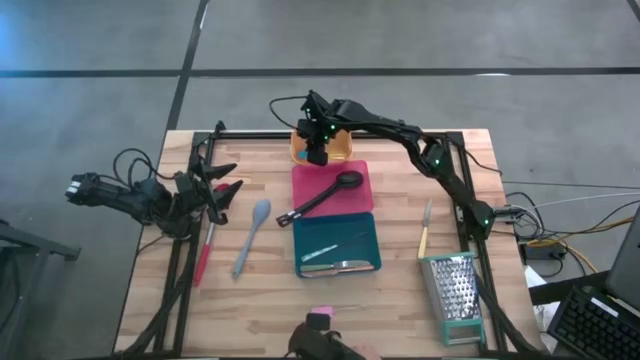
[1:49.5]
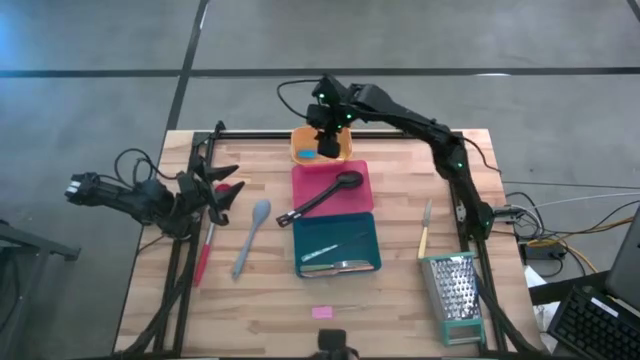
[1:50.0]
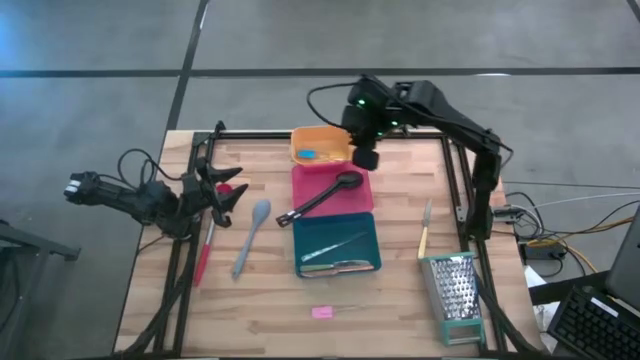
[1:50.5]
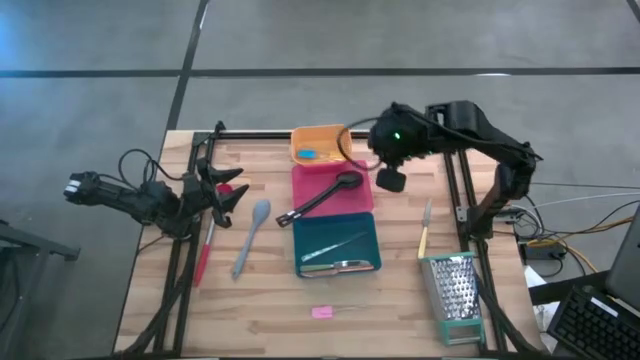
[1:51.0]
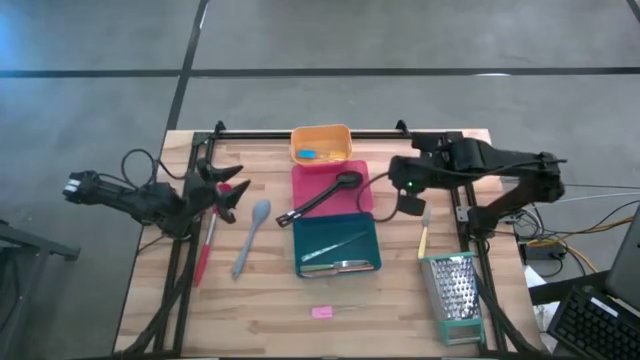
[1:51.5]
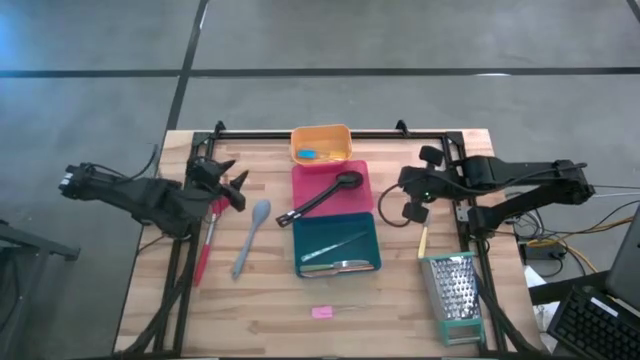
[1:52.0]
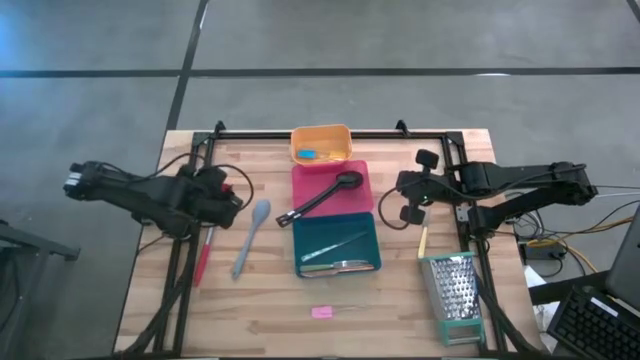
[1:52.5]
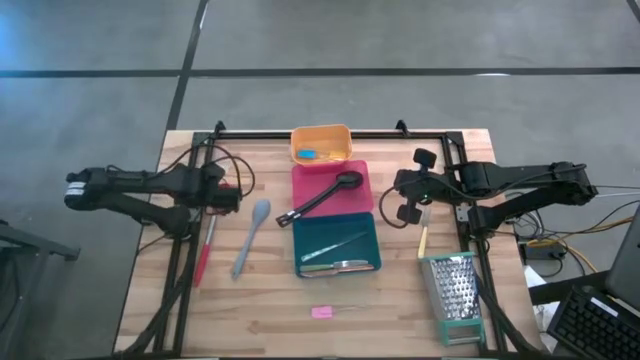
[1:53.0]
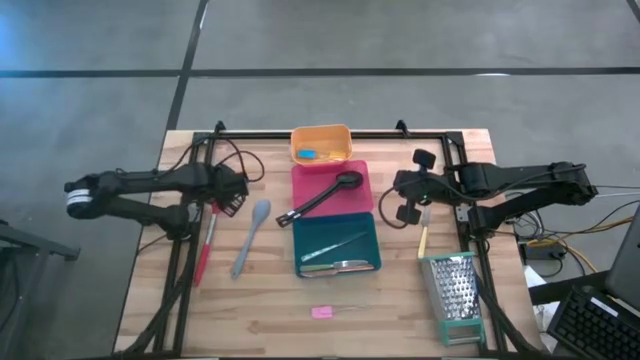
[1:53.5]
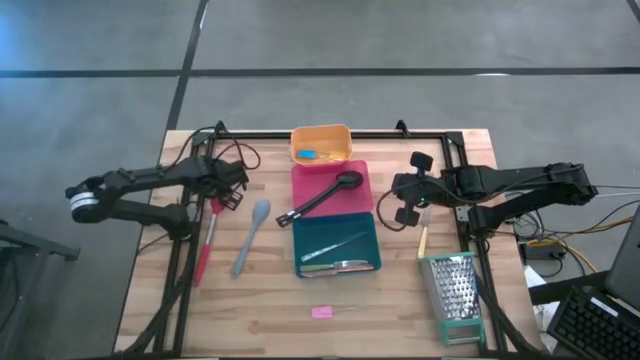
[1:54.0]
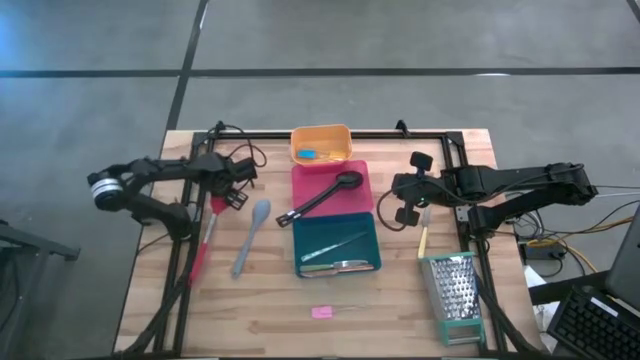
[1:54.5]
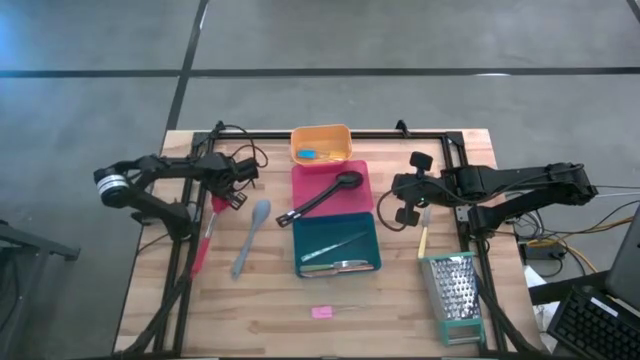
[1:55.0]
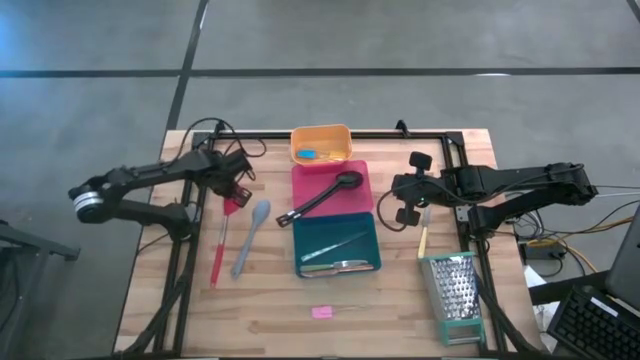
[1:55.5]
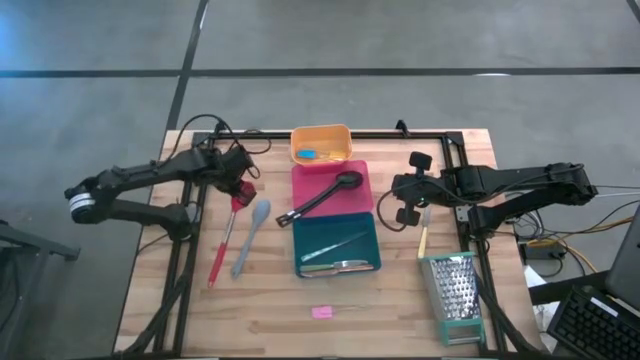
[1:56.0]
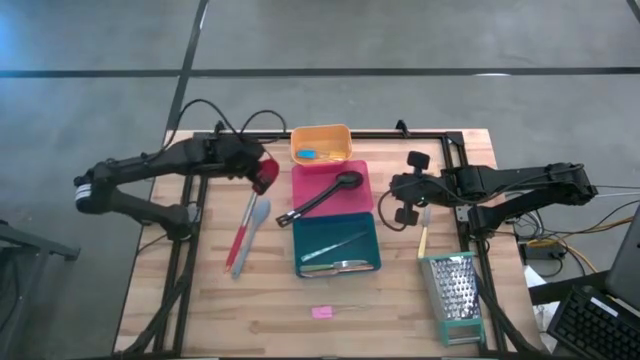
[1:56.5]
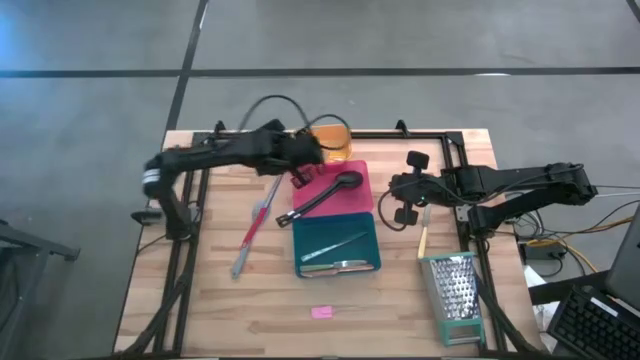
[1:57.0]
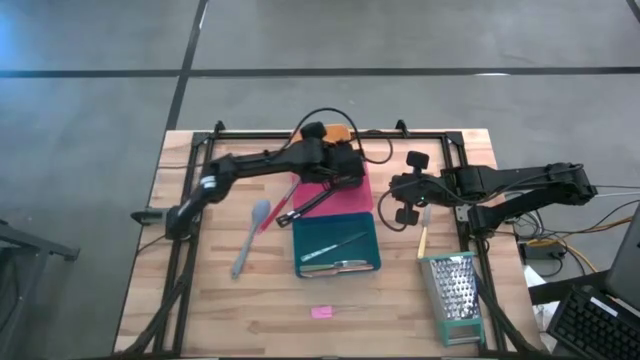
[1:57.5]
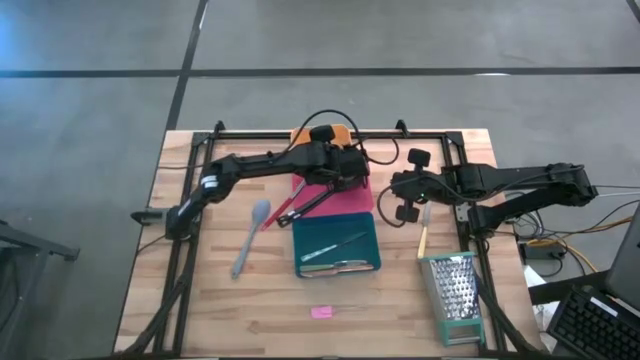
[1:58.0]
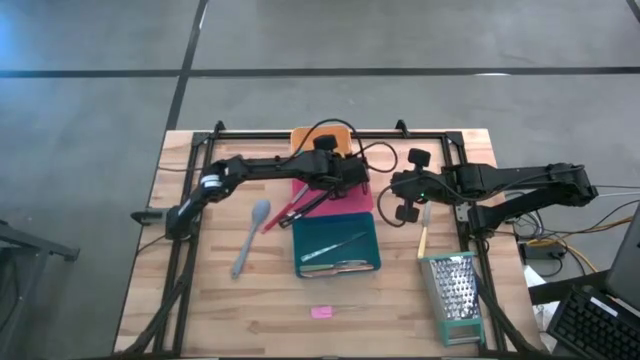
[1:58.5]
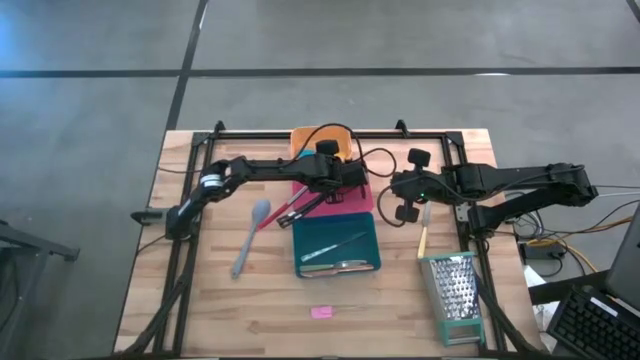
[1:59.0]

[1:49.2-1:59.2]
Task: Pick & Place Kitchen Items
Put the red serving spoon into the pink bin

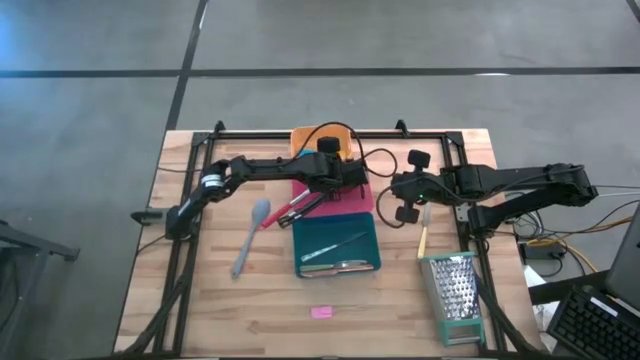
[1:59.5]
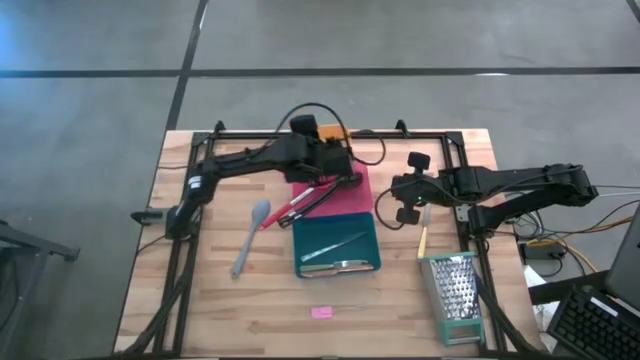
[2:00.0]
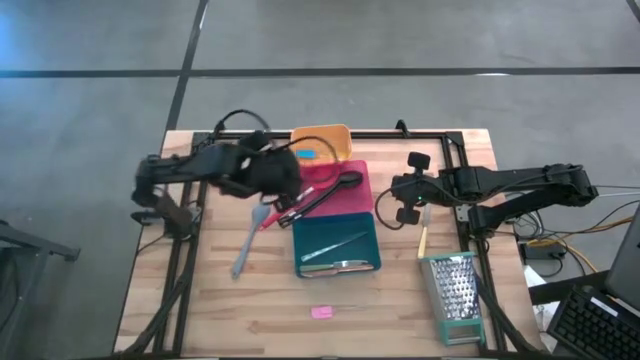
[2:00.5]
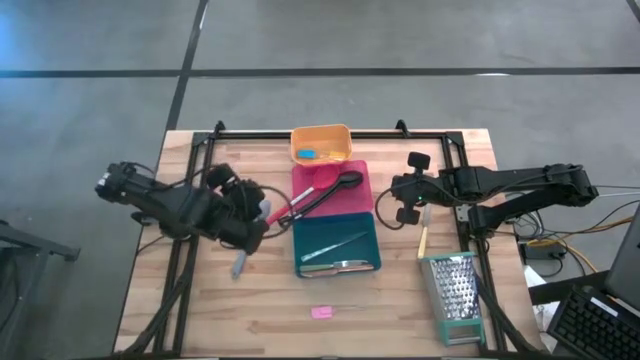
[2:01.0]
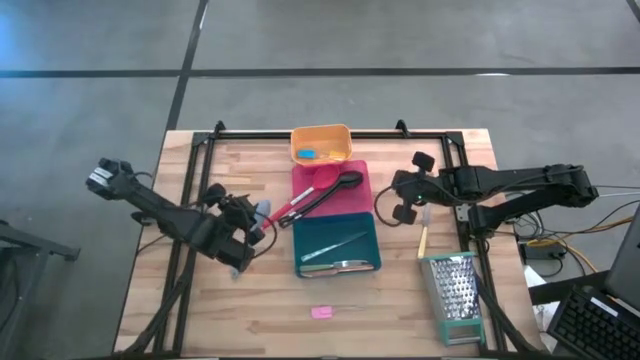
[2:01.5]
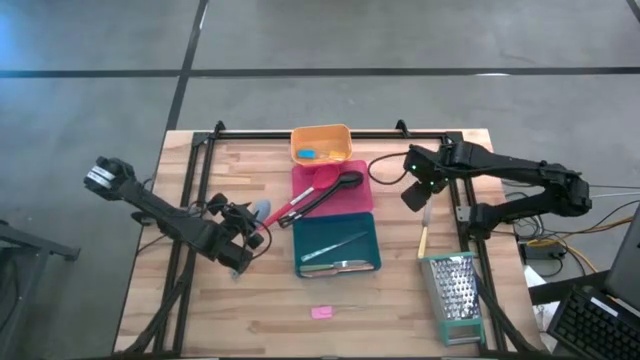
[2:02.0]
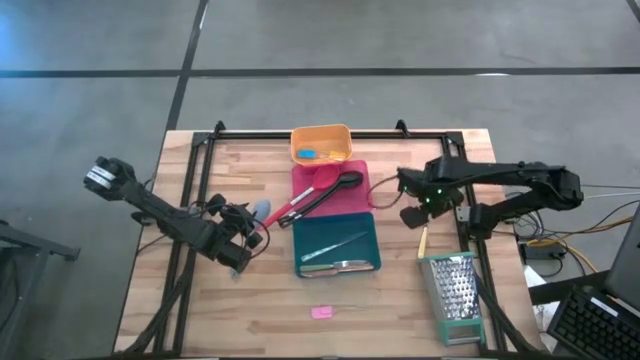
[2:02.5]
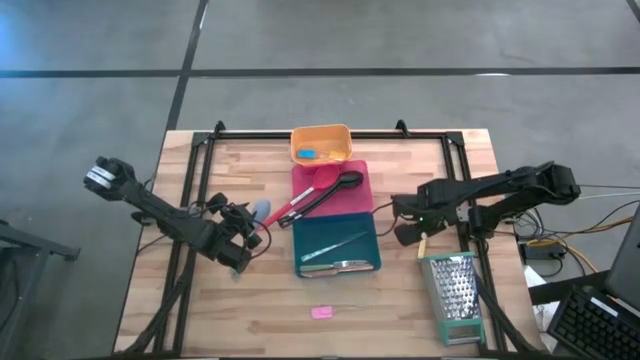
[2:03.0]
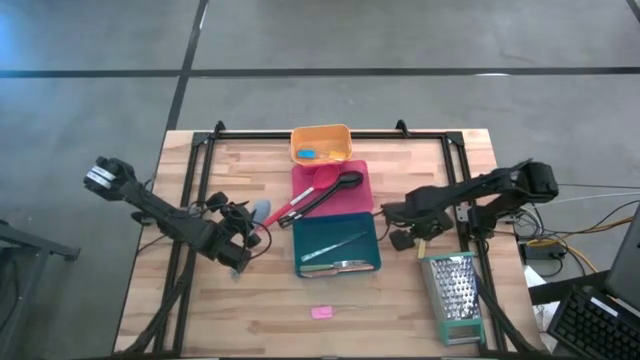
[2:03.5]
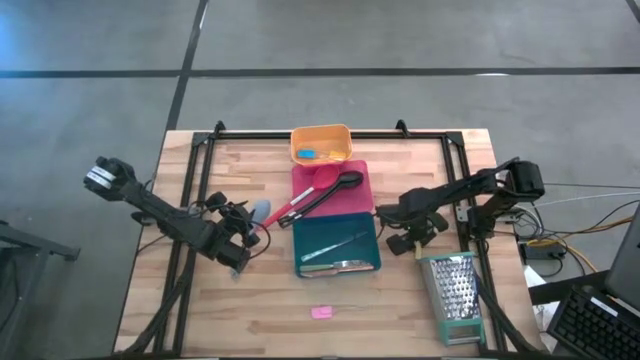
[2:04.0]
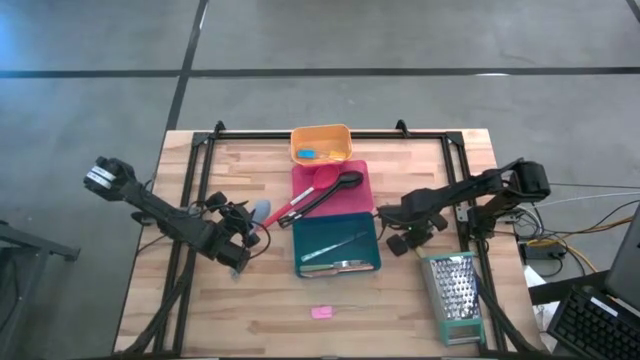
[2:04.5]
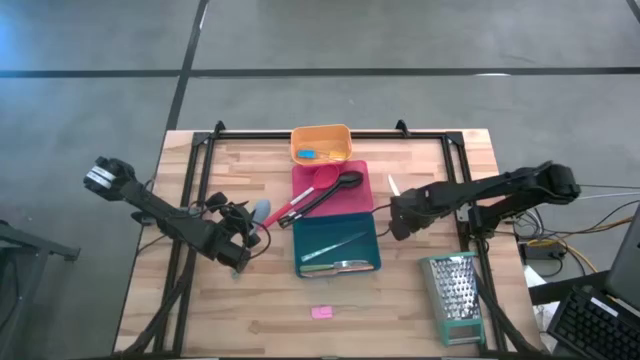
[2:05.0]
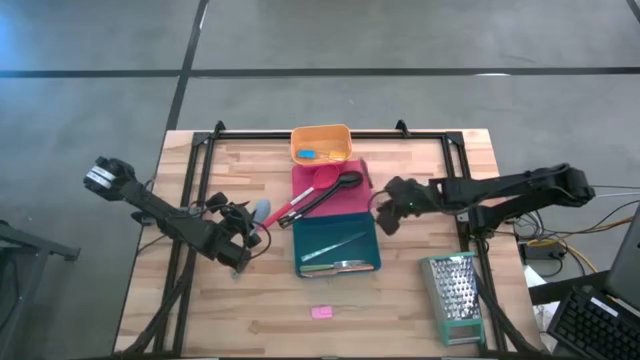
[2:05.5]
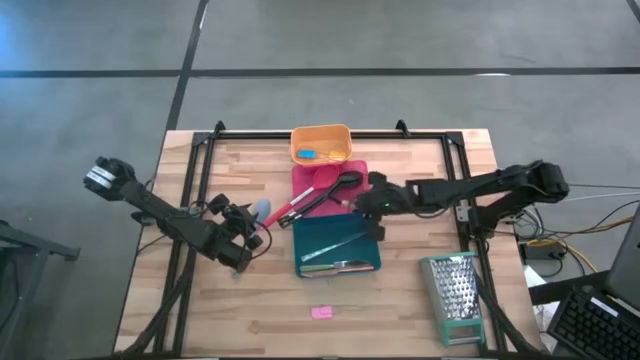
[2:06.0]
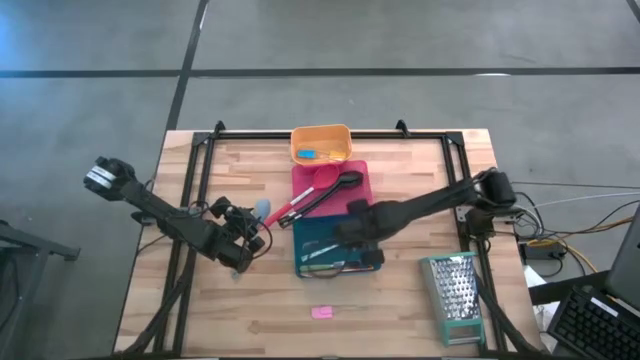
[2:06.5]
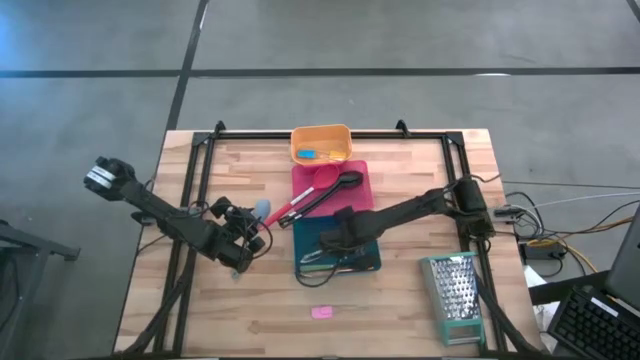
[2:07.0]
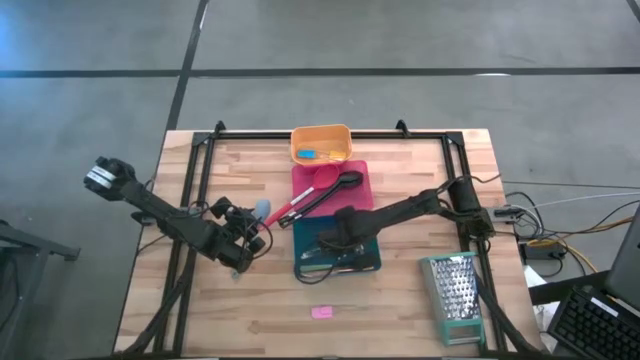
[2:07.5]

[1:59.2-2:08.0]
Put the yellow knife into the blue bin

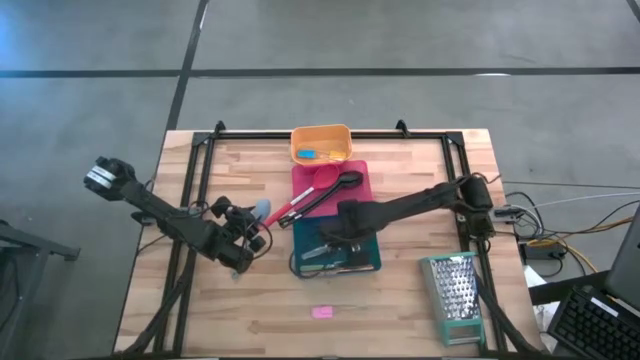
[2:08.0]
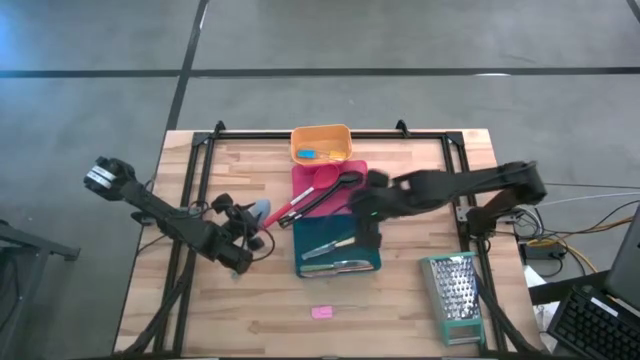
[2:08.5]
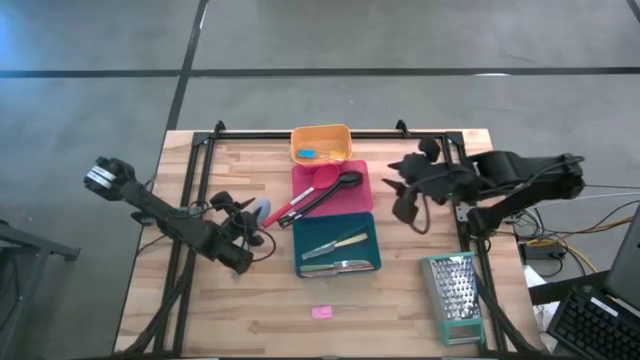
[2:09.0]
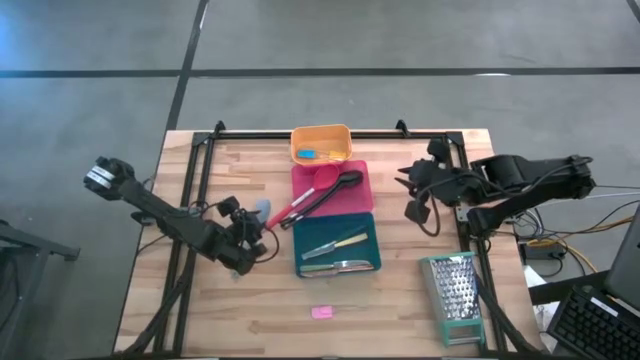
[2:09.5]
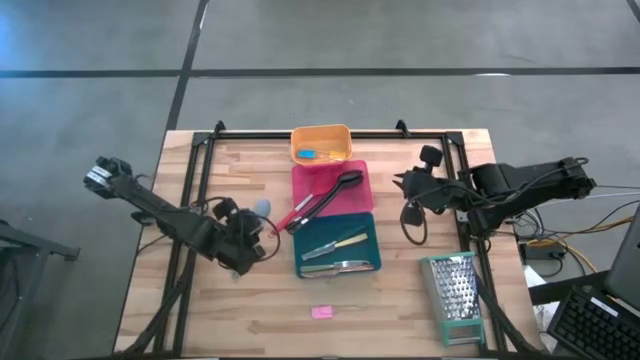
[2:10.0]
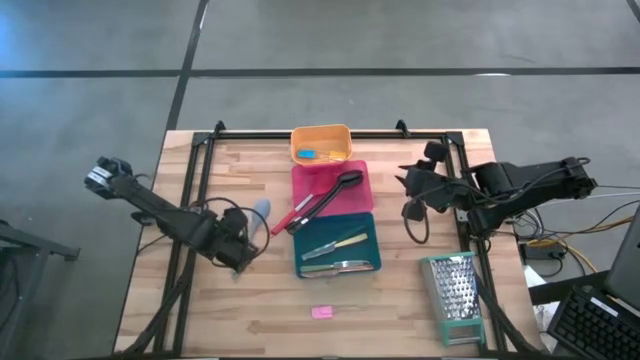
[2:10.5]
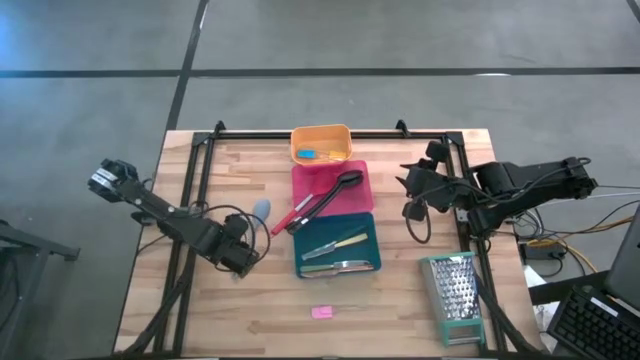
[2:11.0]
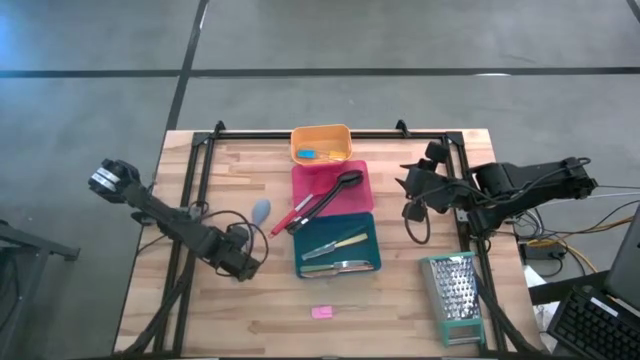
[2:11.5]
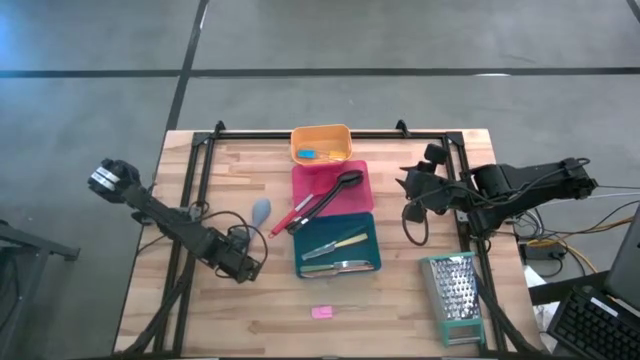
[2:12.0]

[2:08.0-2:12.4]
Put the light blue serving spoon into the pink bin

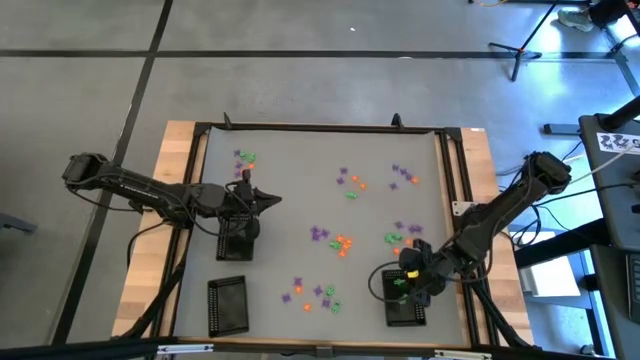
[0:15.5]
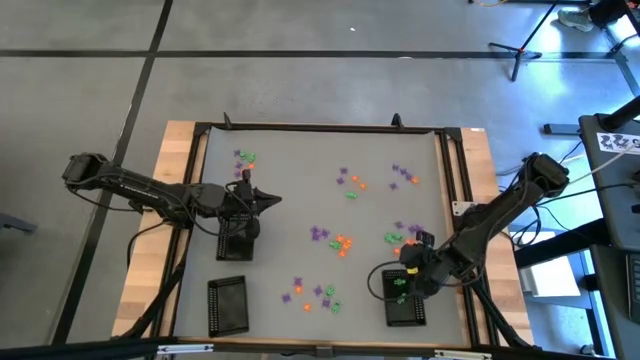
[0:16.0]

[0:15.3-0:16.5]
Task: Sort Halloween decoration
Adjust the bottom right black basket
